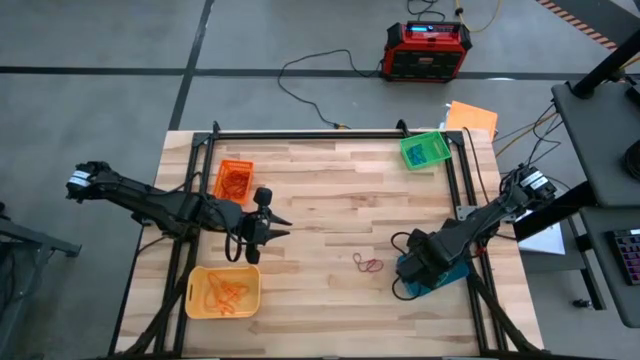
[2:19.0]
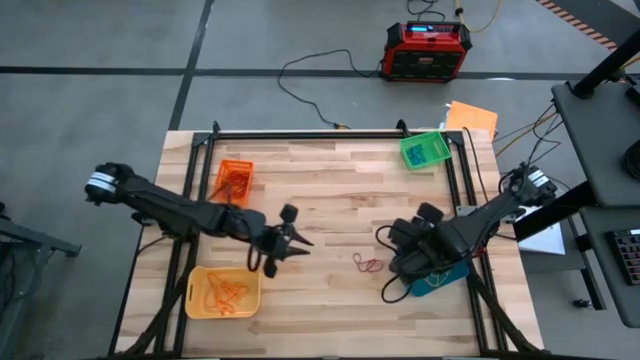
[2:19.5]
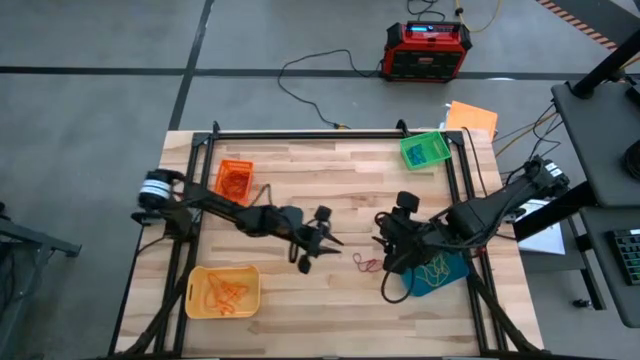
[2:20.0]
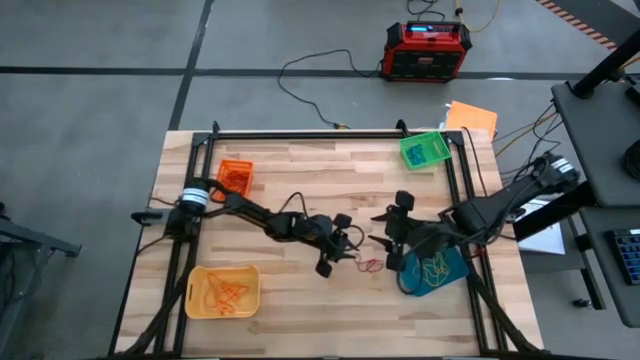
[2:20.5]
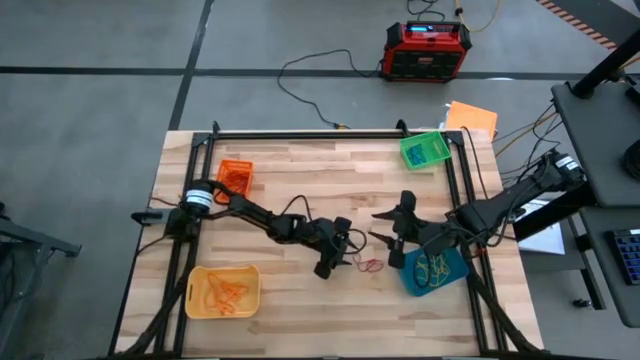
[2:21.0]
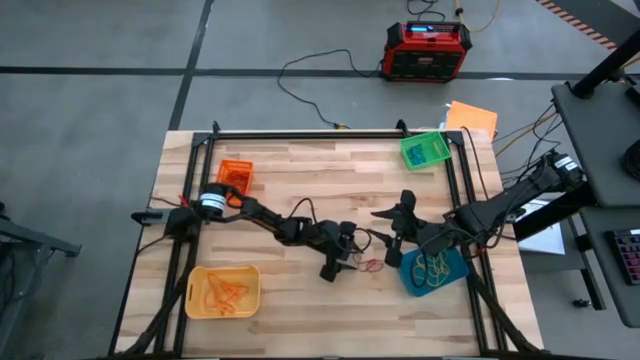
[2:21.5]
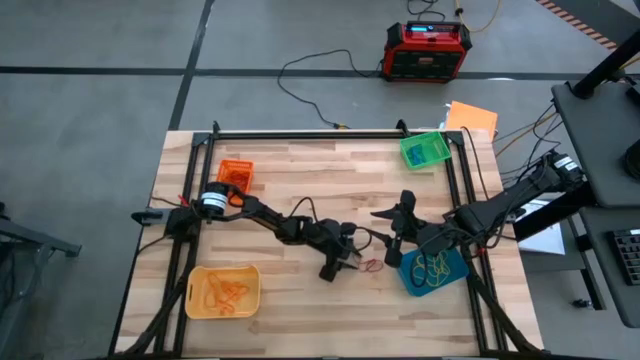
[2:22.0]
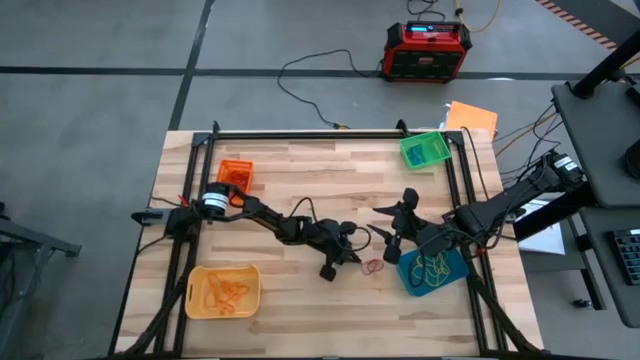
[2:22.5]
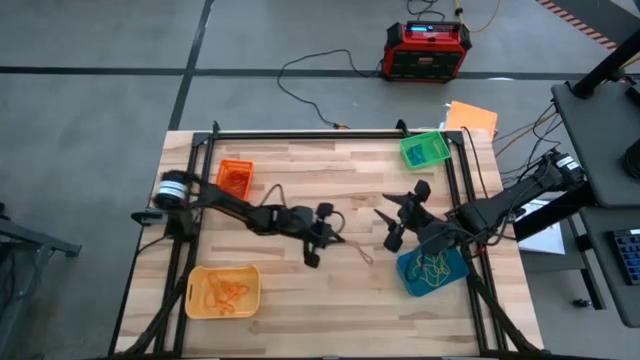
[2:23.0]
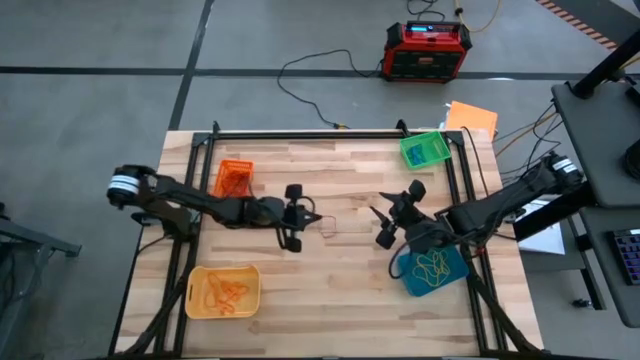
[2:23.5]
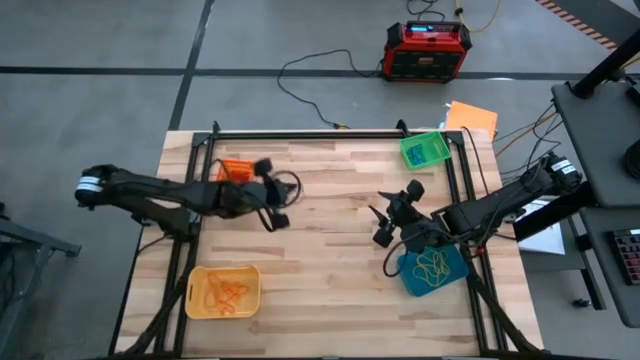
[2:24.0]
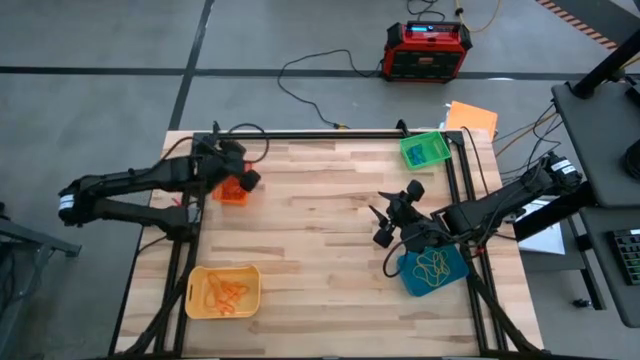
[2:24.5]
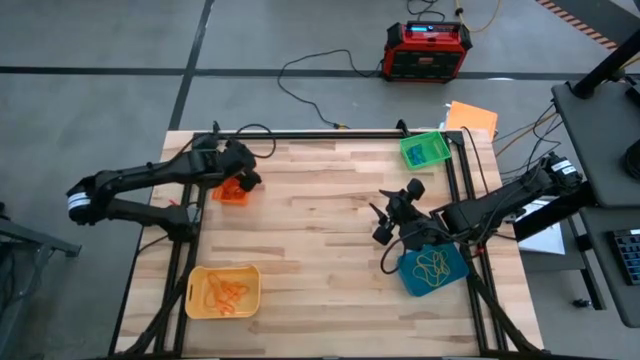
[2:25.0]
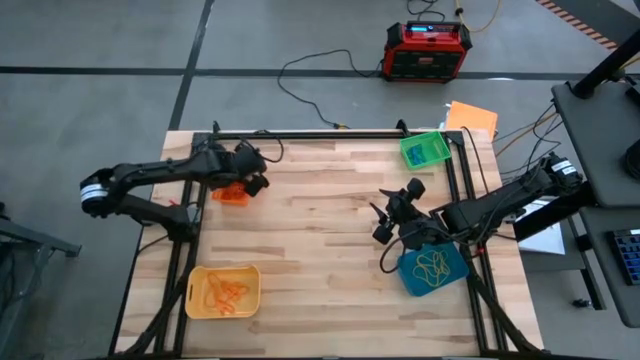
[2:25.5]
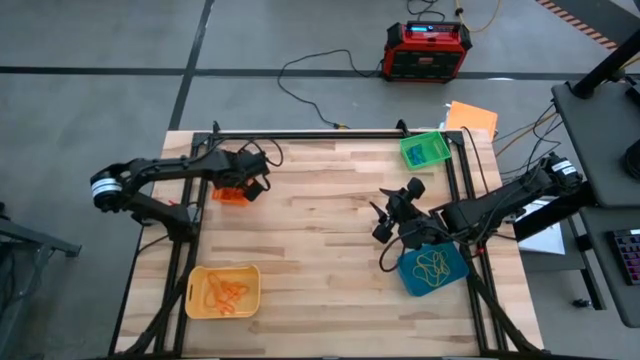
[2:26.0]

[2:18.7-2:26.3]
Task: Sort rubber bands into baskets
Put the red rubber band into the orange bin

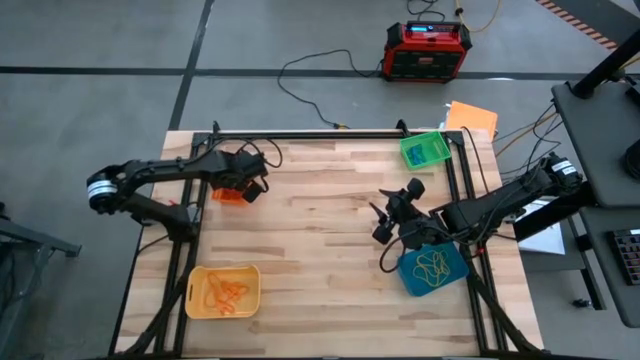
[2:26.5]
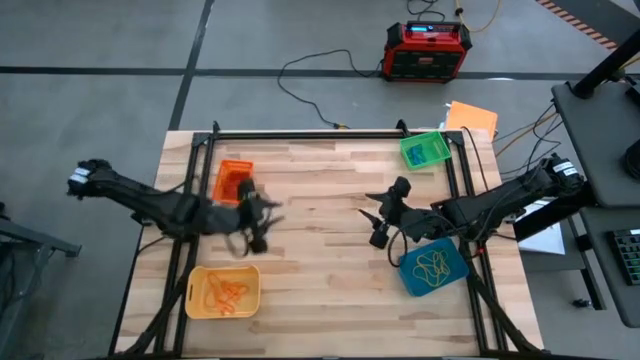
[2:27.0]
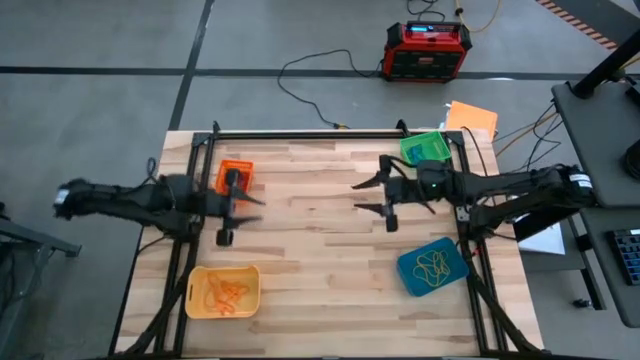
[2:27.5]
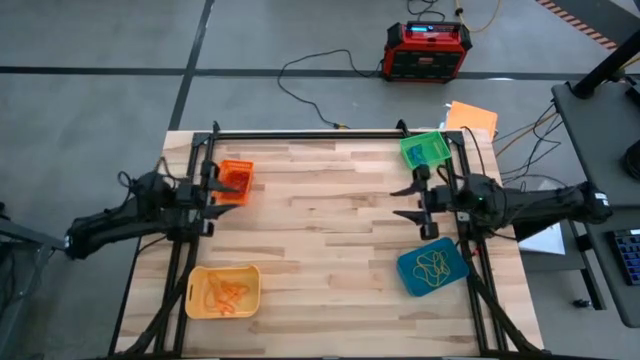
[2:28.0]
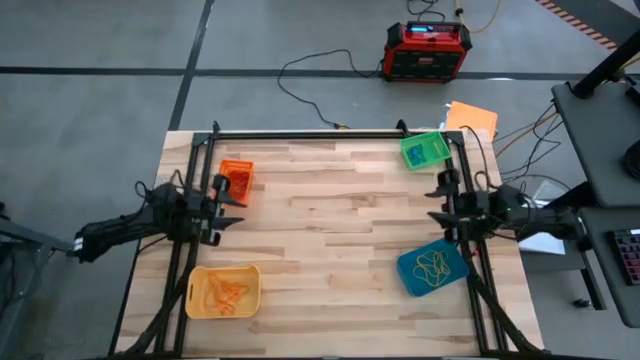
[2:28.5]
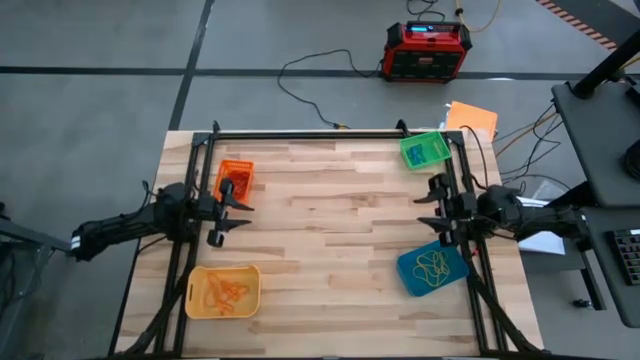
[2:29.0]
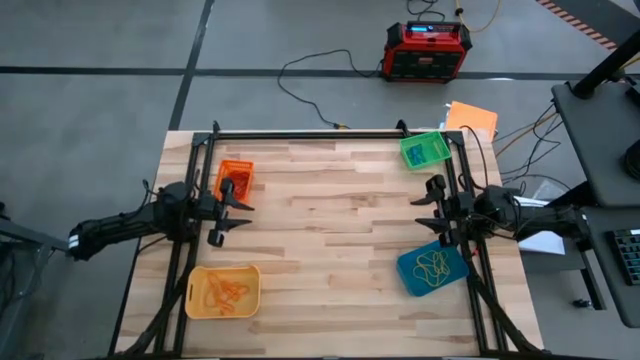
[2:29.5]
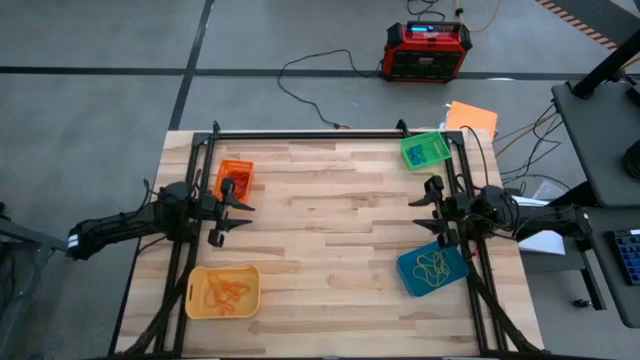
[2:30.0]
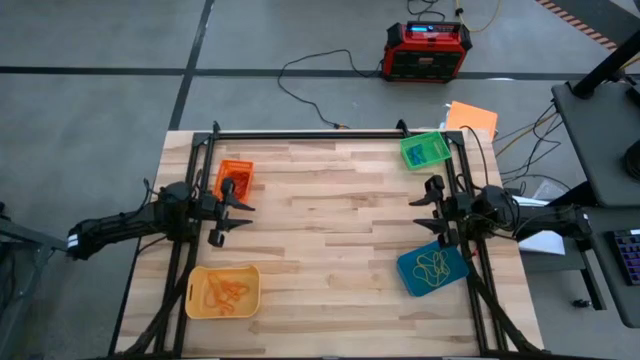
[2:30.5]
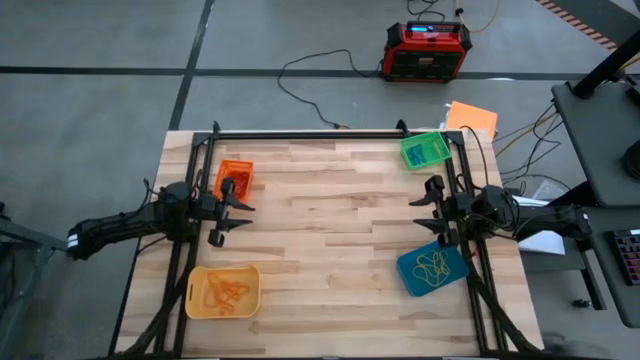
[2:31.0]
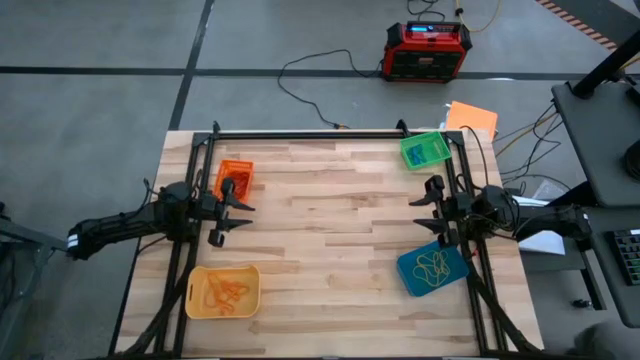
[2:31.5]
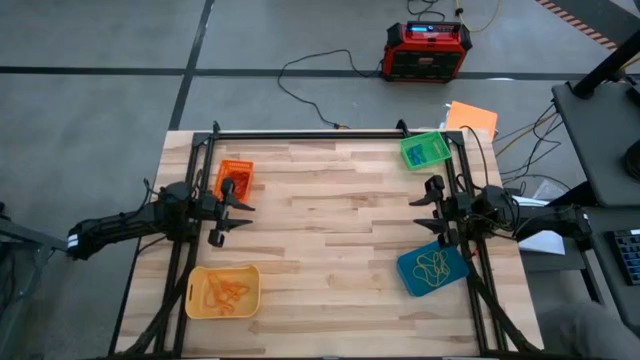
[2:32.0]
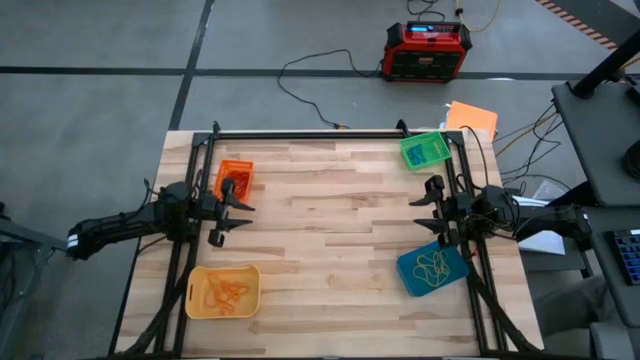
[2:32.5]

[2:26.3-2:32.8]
Return to Home Position

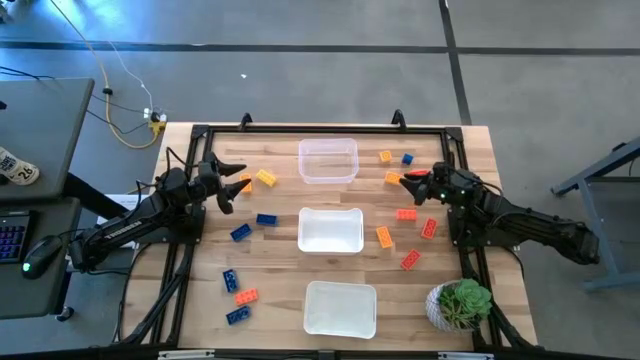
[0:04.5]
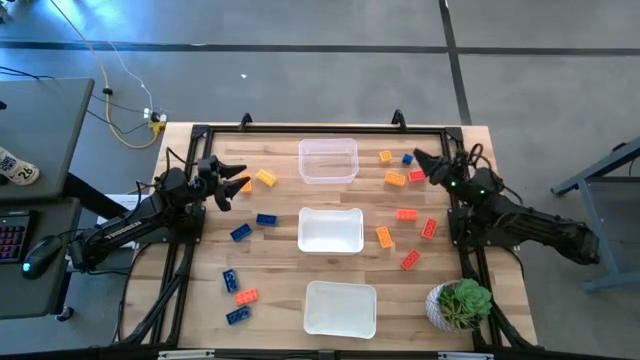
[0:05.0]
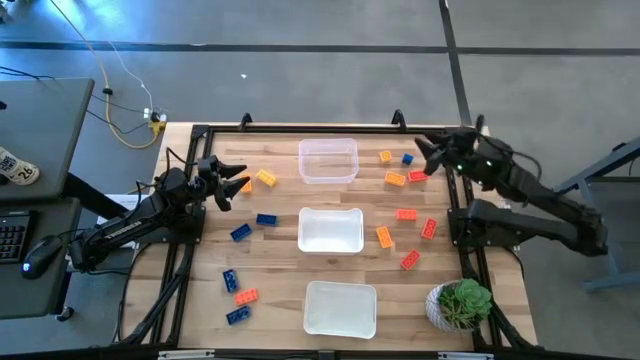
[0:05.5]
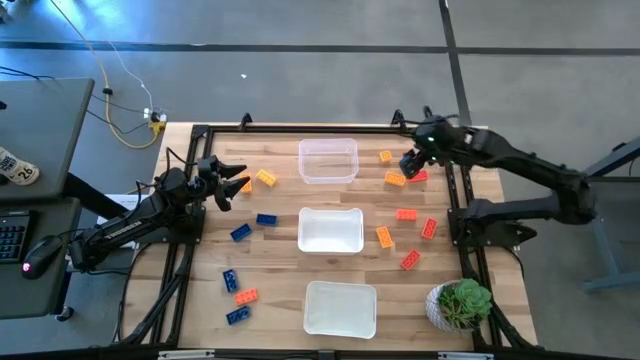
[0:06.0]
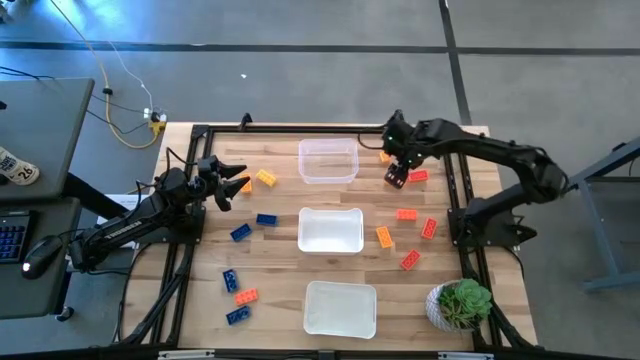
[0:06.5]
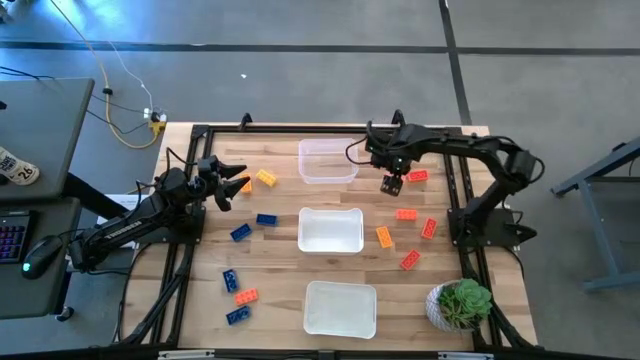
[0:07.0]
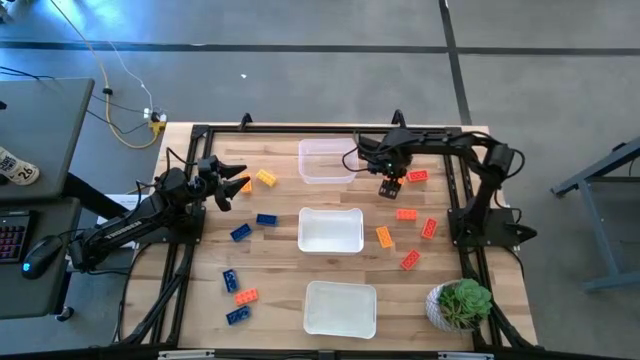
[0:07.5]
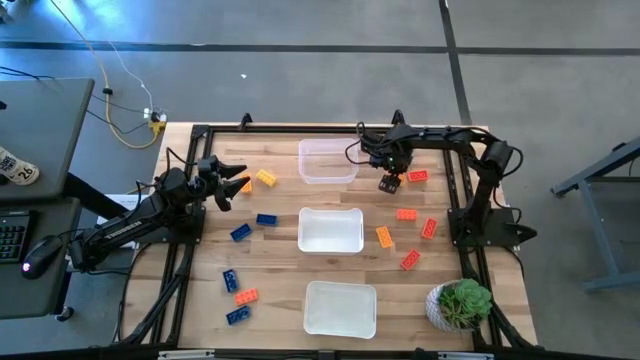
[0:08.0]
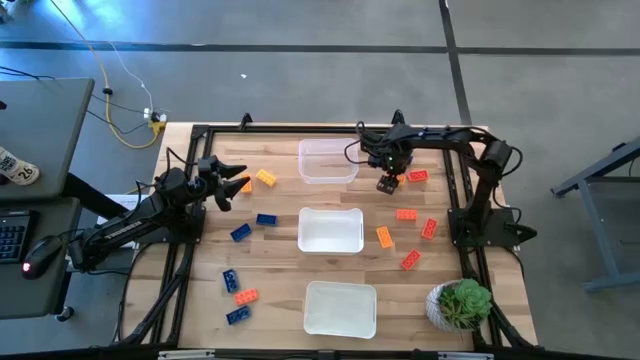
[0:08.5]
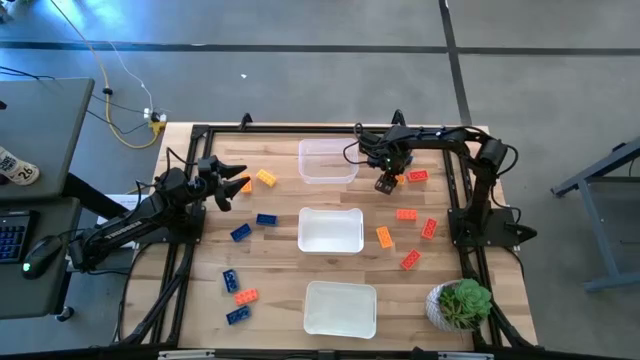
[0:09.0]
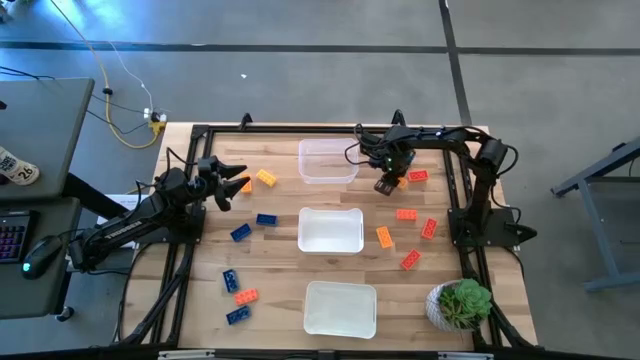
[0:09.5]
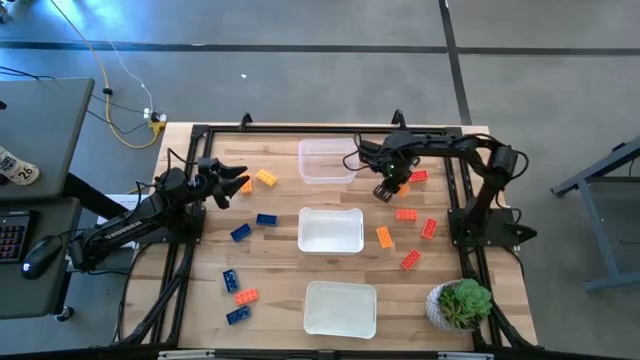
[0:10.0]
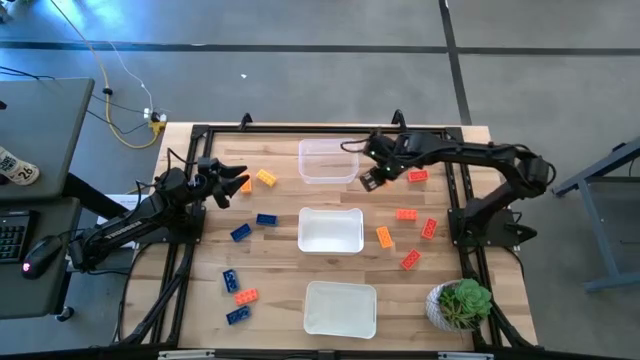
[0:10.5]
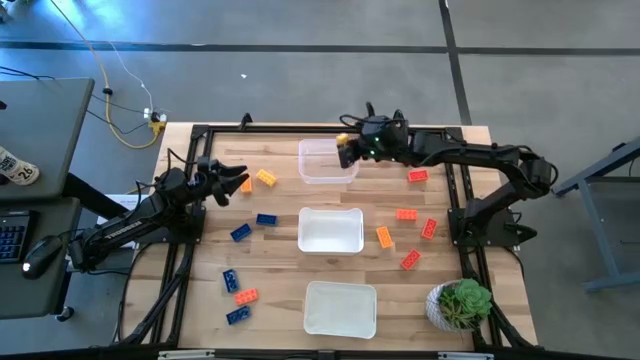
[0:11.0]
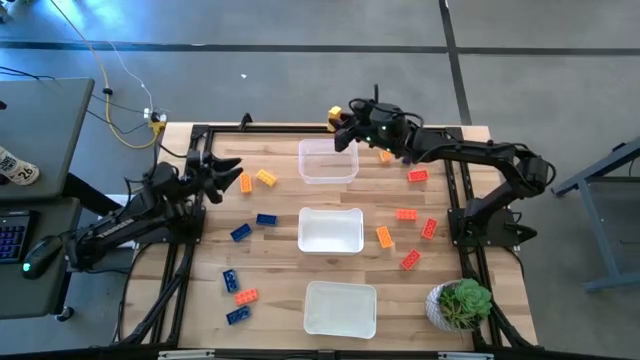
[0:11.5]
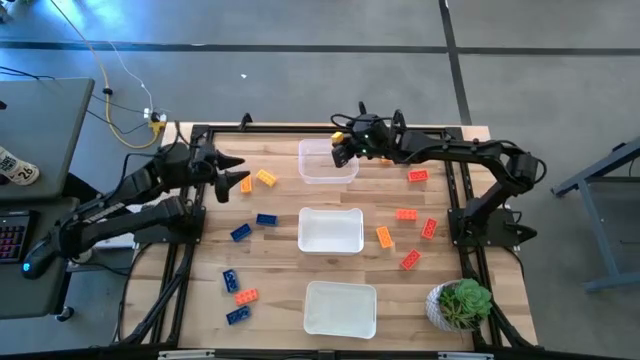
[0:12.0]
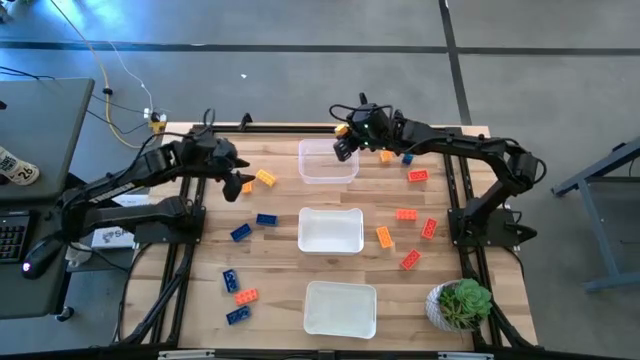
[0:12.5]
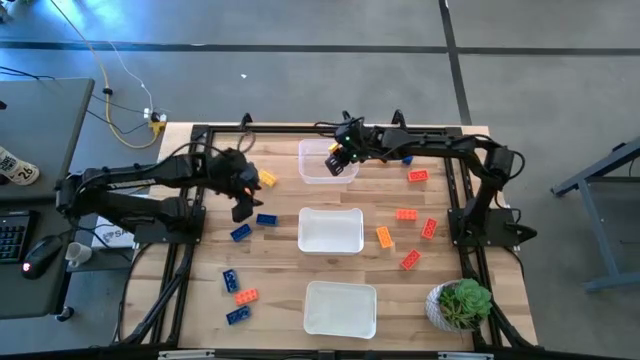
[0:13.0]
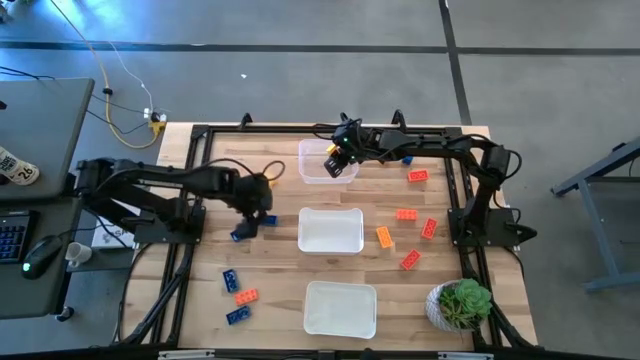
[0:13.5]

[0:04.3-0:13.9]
Task: Sort & place blocks by color
Put the yellow game piece into the transparent bin
